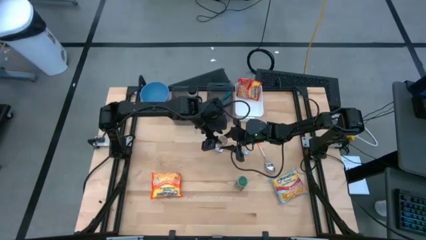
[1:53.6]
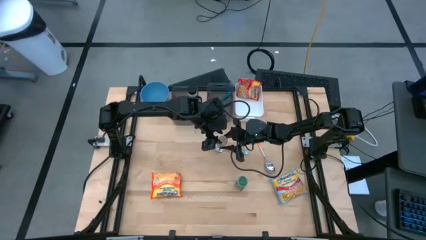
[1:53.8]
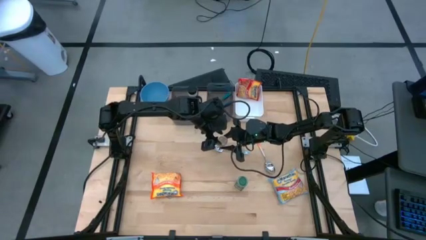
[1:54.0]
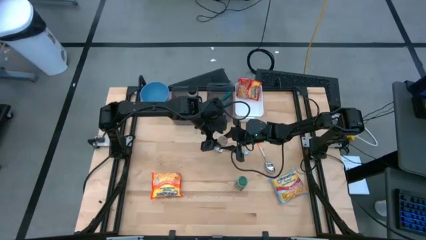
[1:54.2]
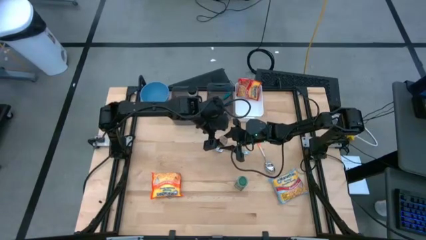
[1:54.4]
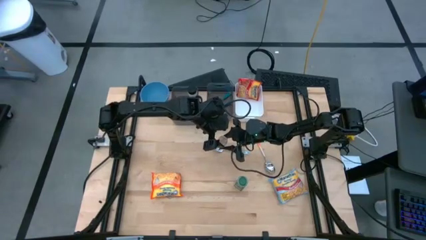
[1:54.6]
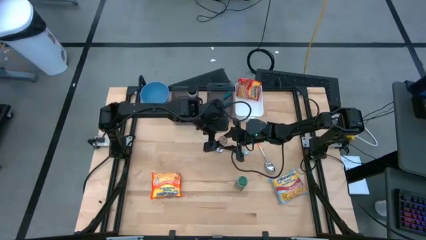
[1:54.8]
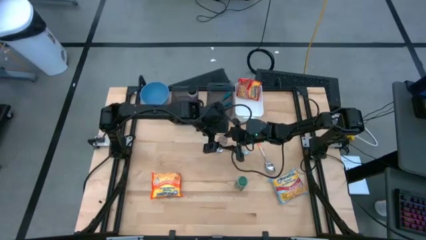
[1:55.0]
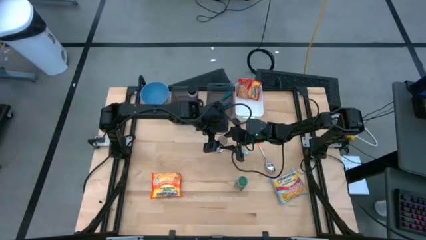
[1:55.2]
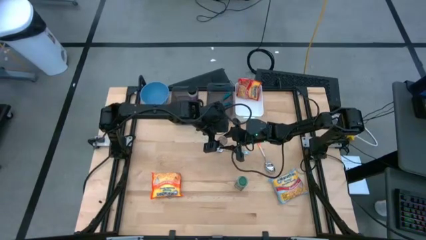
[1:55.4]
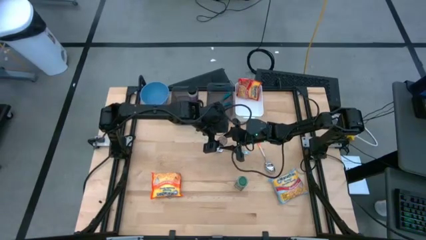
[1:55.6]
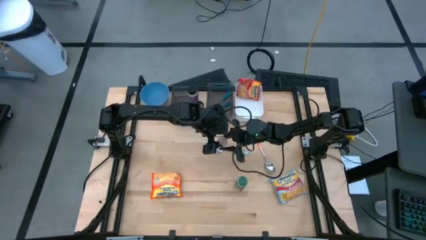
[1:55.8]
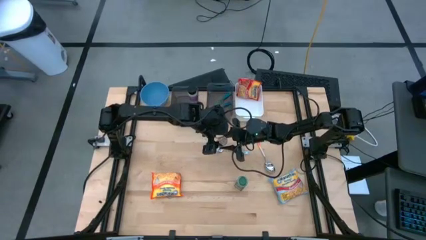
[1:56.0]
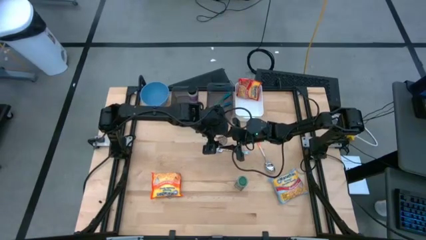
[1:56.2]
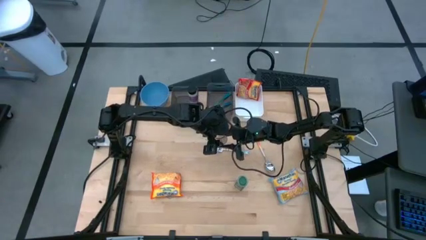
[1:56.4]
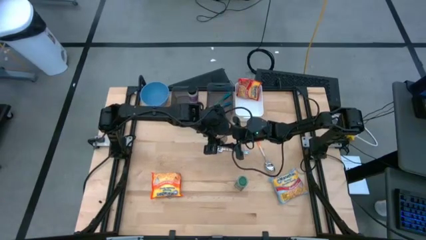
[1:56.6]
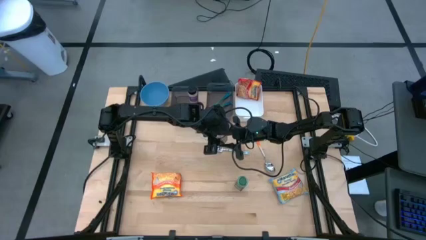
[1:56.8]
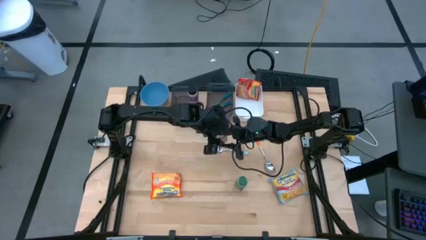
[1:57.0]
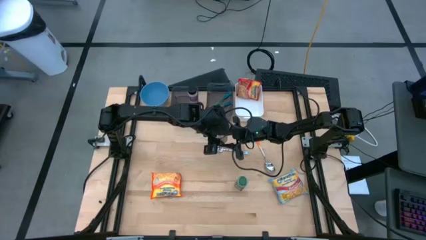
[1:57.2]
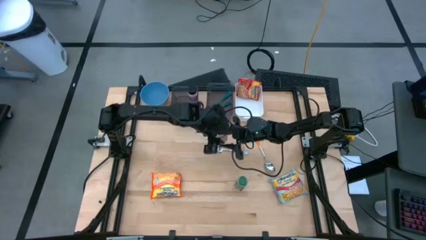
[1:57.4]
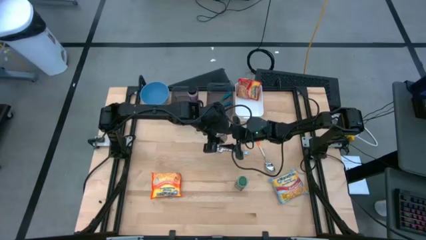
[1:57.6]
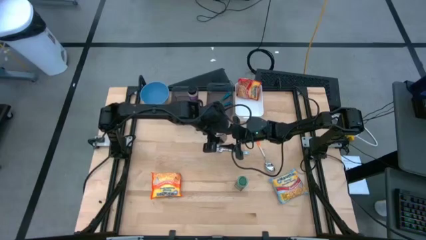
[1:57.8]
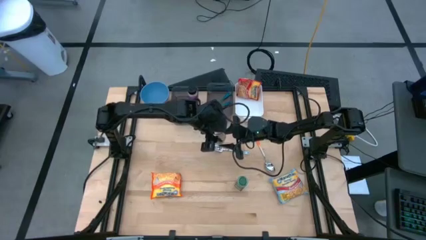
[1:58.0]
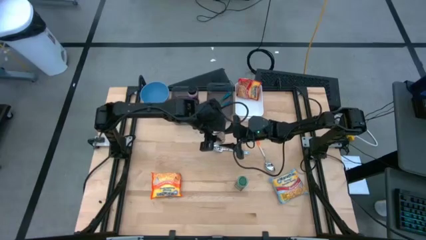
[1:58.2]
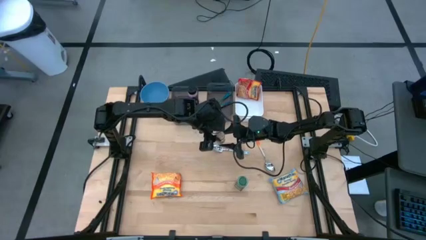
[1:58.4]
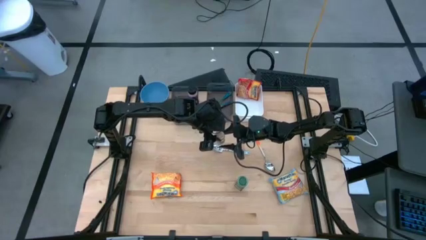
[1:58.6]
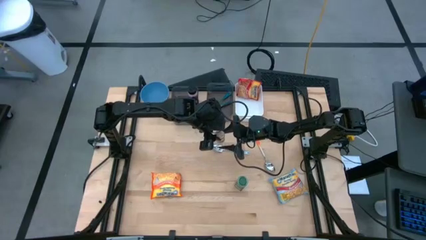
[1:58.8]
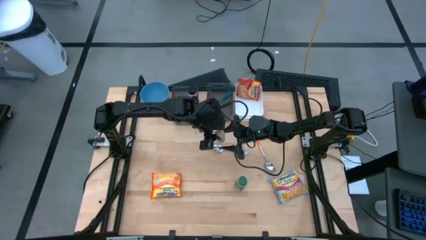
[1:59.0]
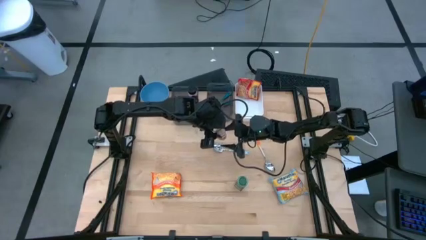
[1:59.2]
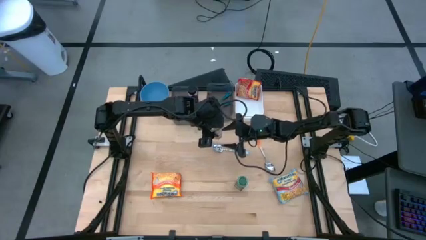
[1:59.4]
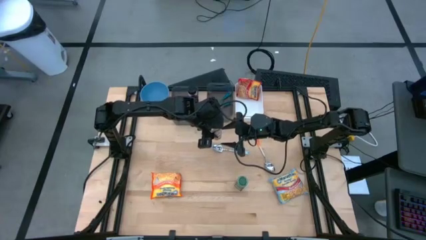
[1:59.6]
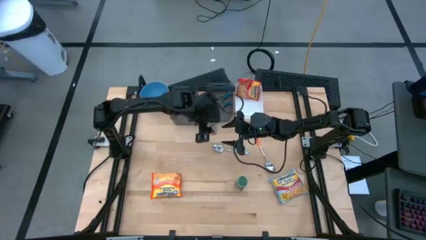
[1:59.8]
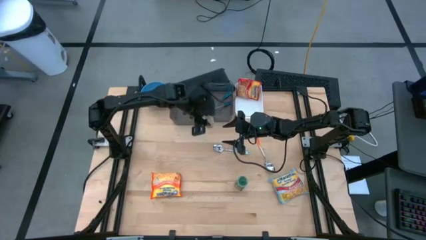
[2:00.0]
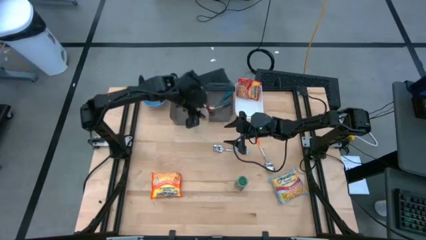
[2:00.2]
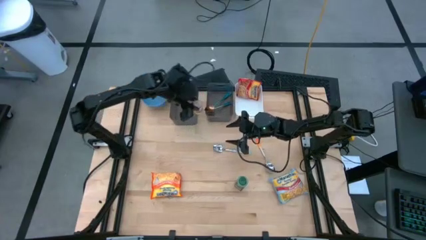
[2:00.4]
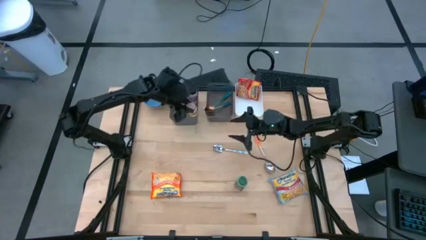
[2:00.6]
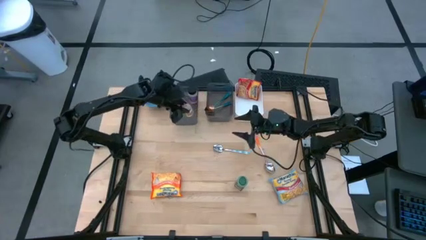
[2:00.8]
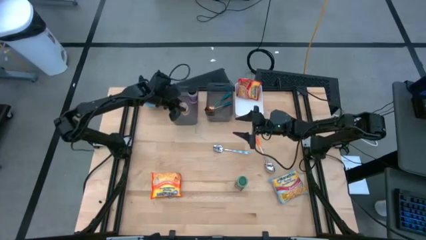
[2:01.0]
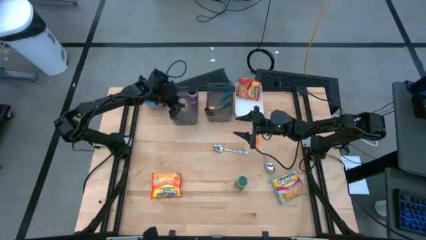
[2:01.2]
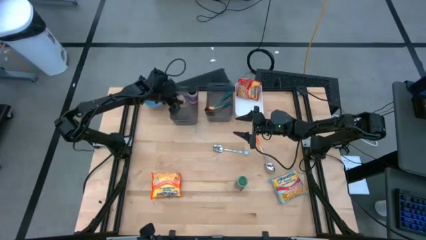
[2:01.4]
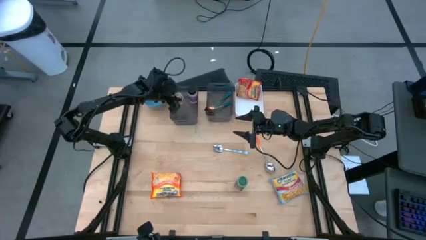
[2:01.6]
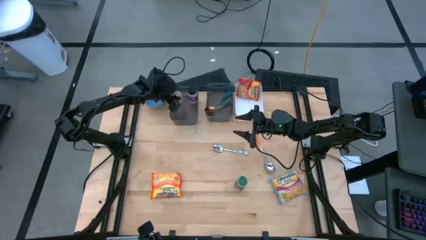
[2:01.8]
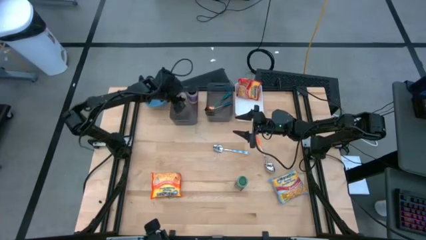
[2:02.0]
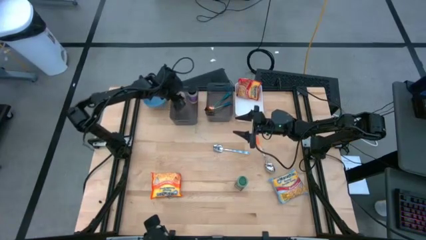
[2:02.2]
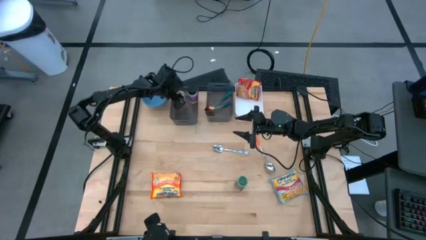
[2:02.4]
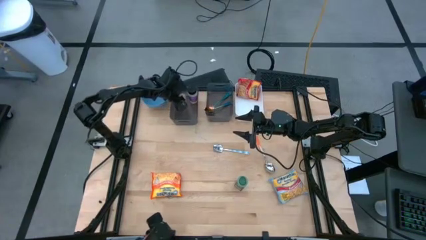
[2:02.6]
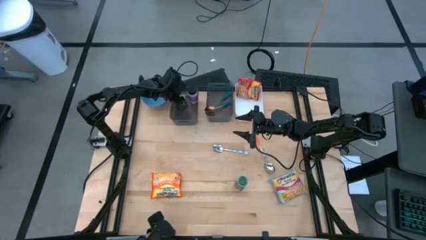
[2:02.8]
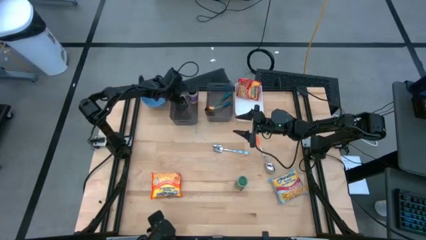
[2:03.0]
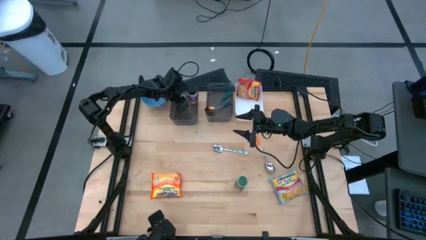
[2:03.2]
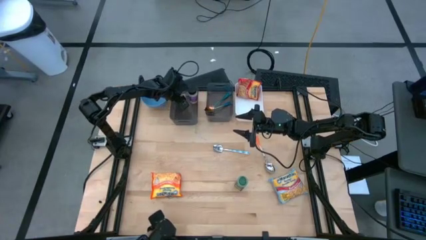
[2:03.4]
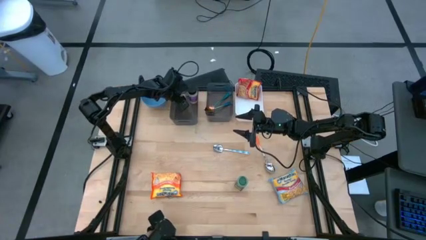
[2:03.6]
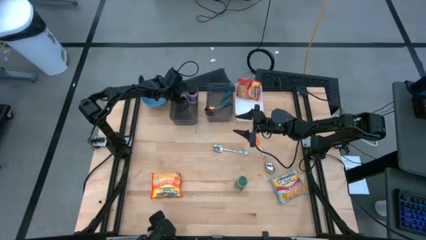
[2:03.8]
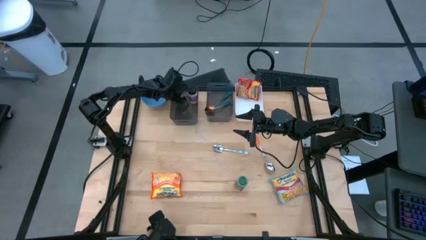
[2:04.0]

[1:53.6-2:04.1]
Task: Pick & Place Food Item
Put the brown spice bottle into the left black bin

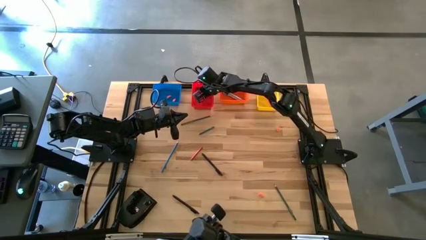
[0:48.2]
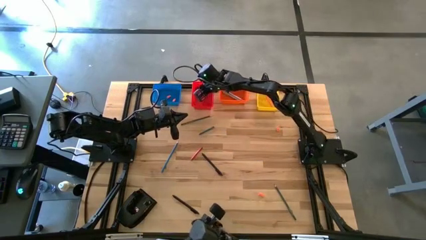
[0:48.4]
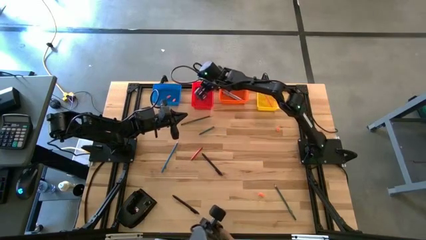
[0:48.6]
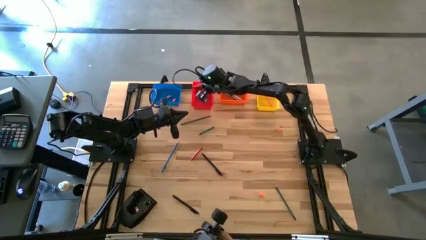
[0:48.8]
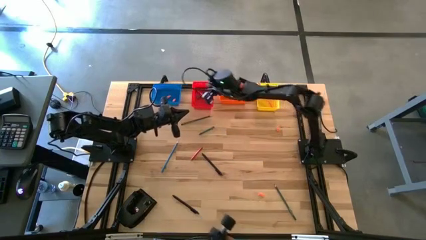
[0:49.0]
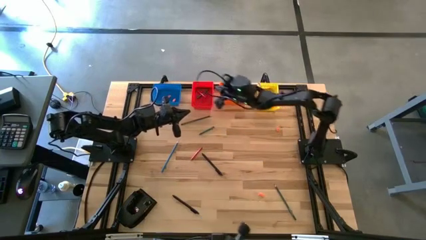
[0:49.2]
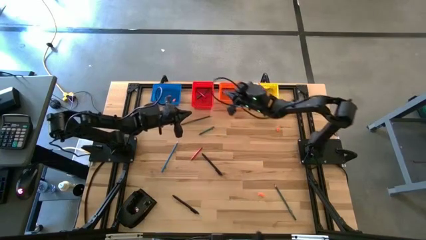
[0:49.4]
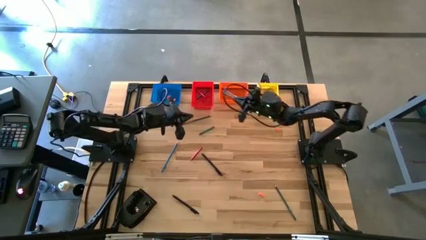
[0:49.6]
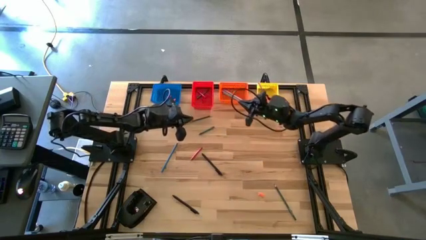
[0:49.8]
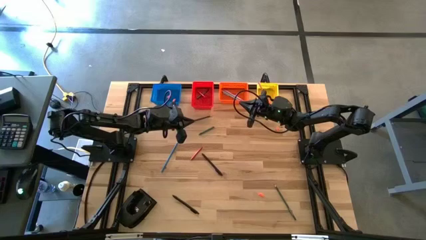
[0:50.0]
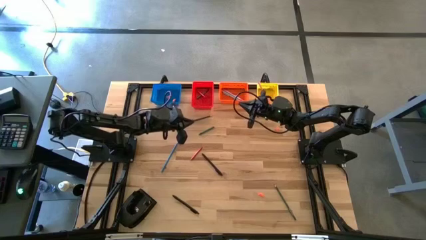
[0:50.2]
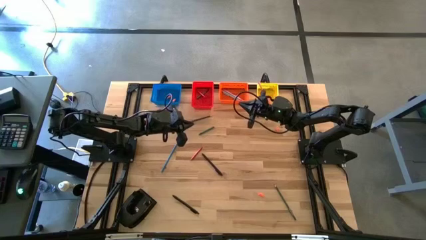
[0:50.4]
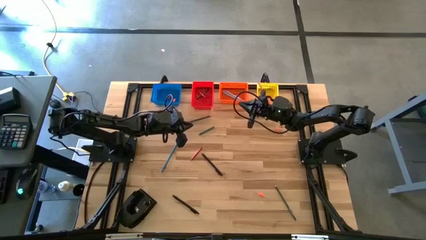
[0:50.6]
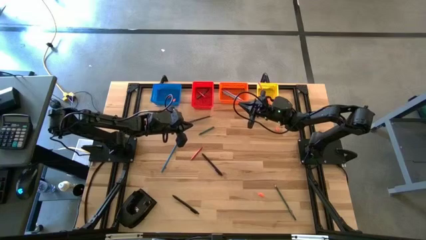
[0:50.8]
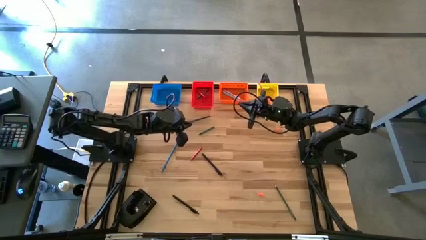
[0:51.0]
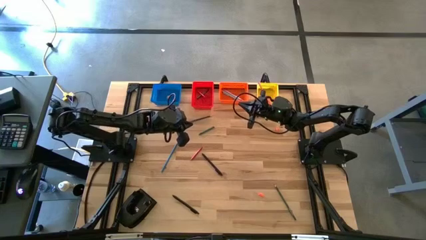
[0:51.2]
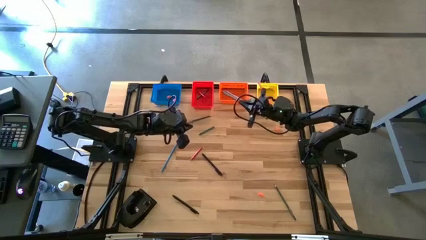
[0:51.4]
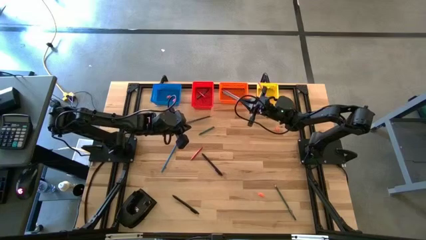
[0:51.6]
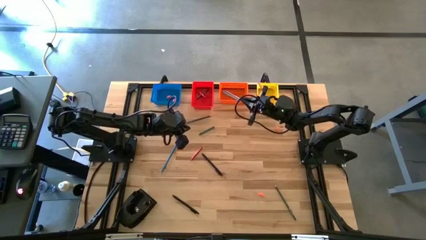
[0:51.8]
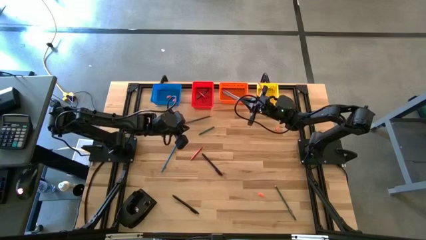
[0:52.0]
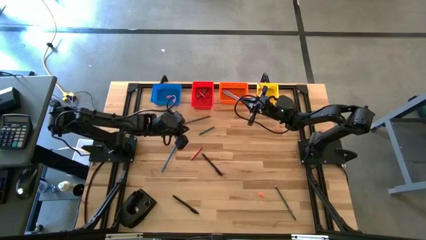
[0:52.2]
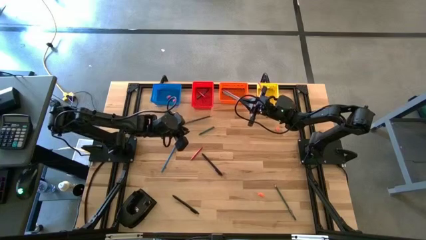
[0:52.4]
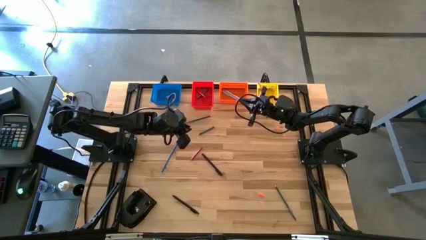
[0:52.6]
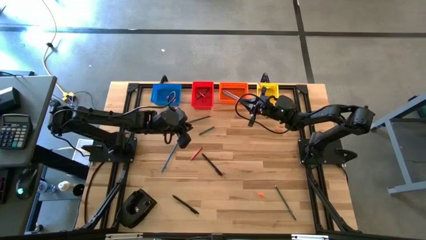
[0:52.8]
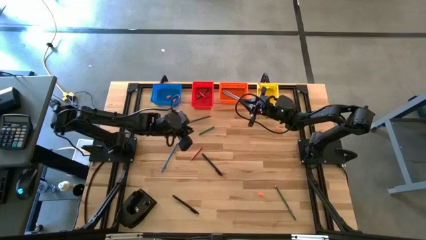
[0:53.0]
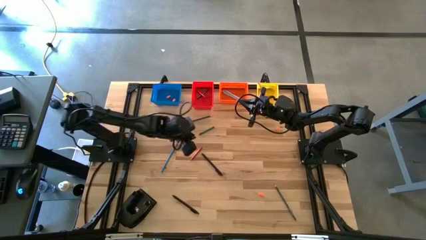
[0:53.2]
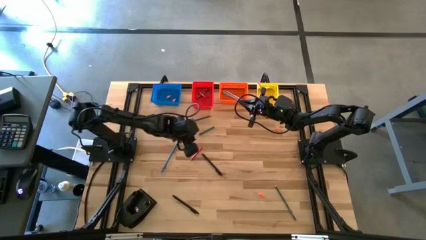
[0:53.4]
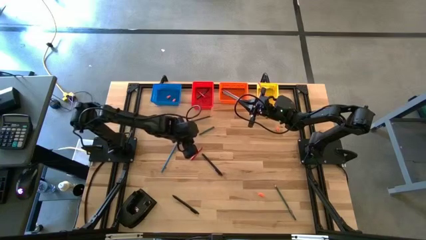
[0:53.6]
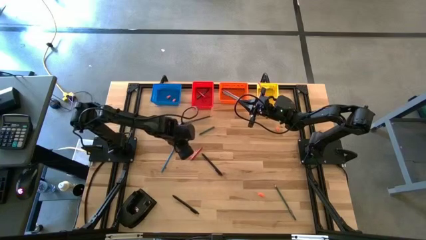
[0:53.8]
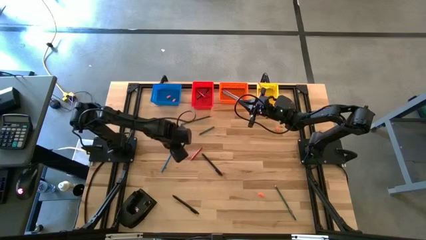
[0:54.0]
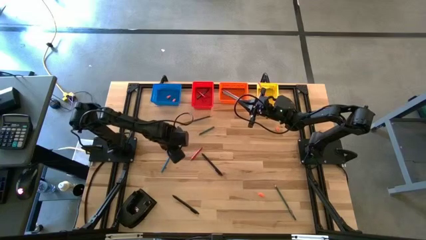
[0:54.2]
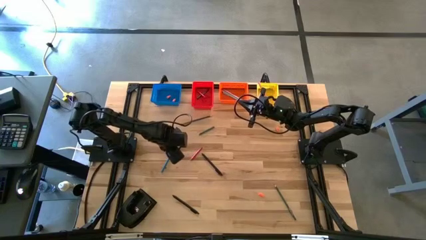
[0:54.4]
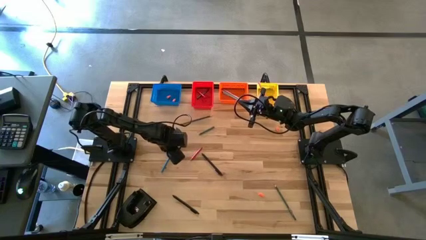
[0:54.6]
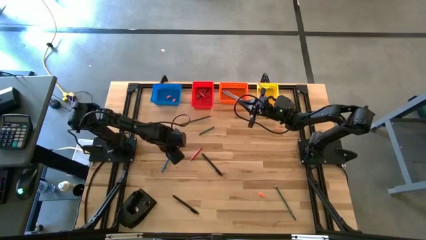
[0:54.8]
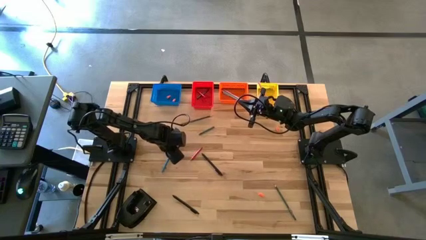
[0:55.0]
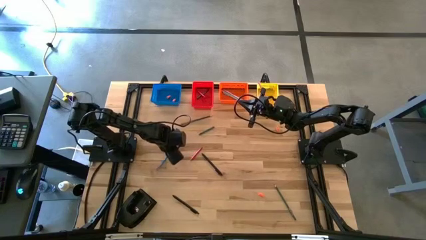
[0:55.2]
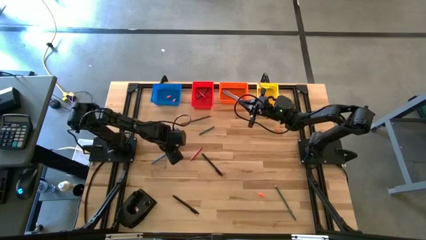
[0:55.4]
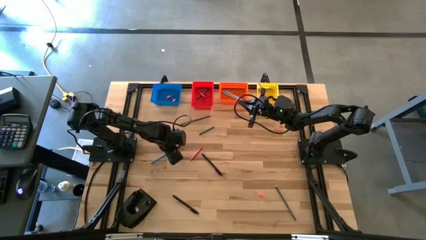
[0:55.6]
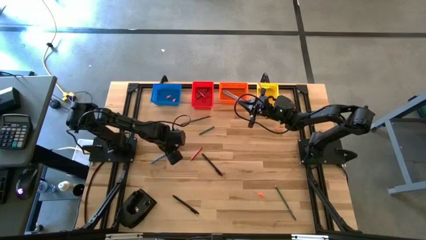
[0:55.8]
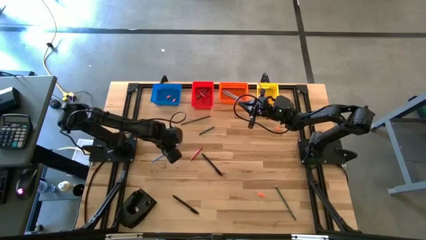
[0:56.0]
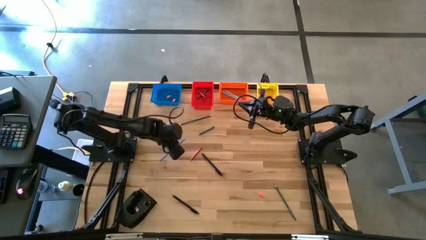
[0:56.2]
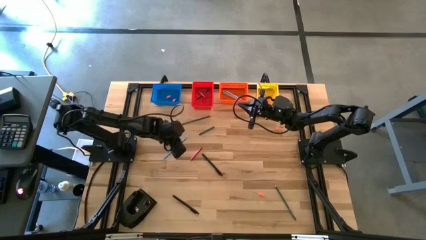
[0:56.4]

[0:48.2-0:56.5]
Task: Sort crayons/erasers/pens/pencils in bins
Put the blue colored pencil into the yellow bin
